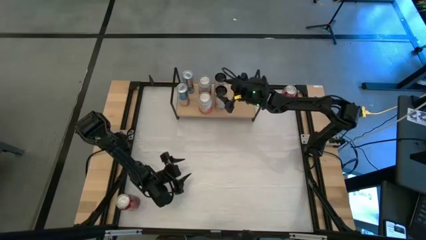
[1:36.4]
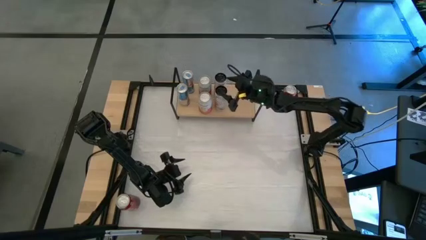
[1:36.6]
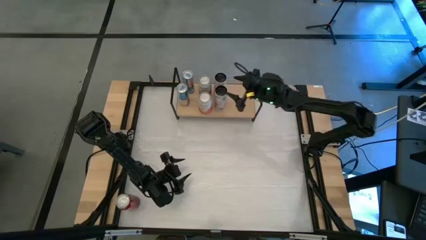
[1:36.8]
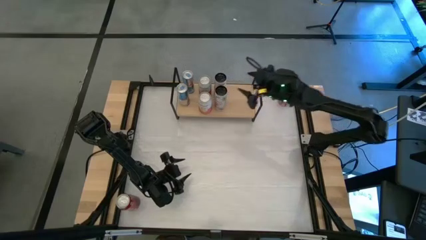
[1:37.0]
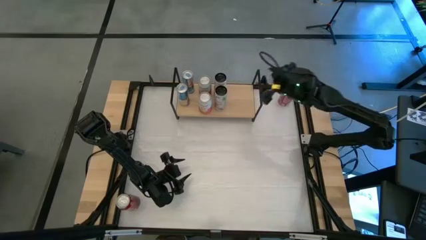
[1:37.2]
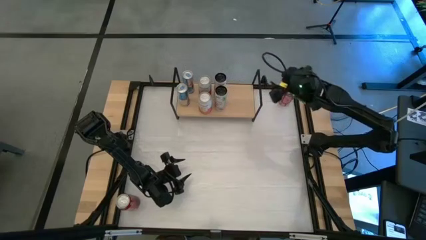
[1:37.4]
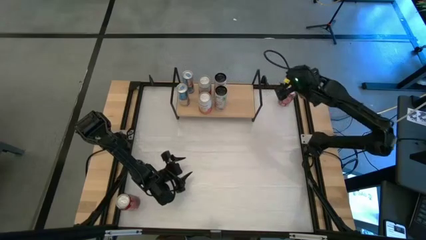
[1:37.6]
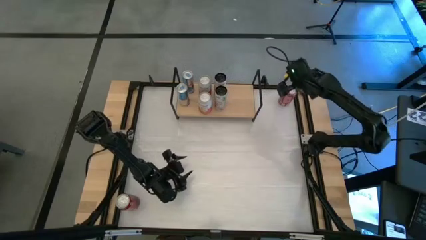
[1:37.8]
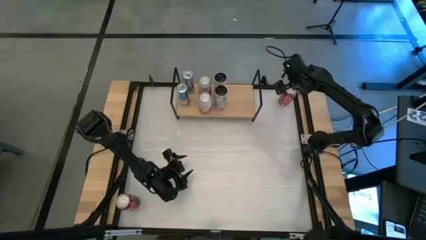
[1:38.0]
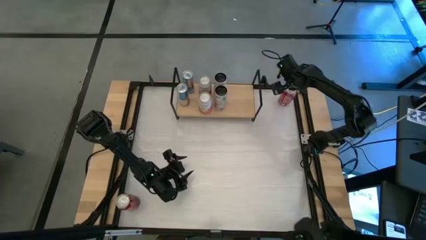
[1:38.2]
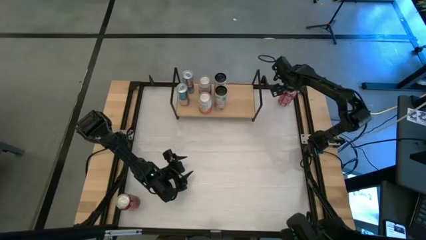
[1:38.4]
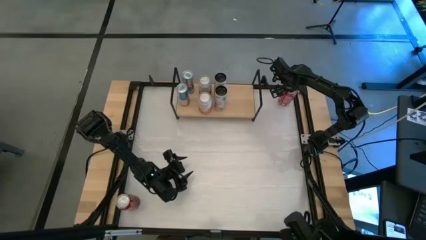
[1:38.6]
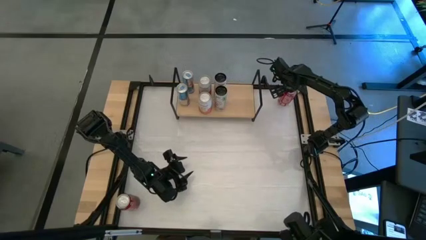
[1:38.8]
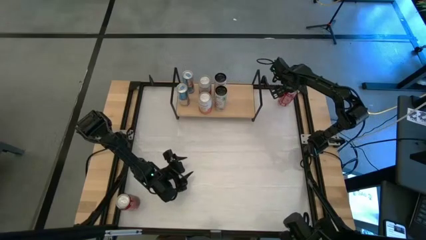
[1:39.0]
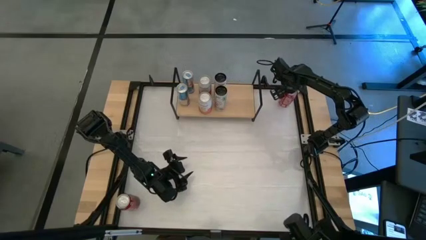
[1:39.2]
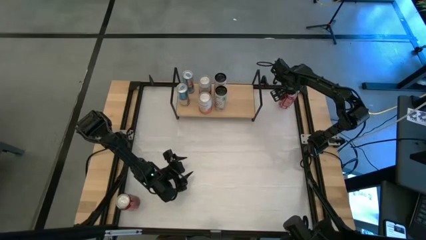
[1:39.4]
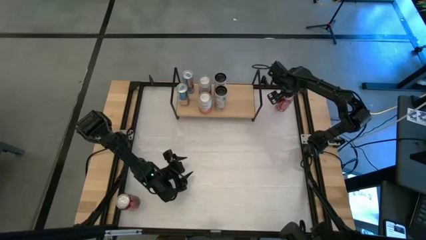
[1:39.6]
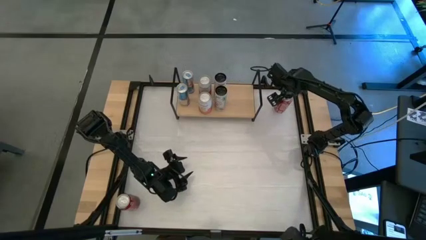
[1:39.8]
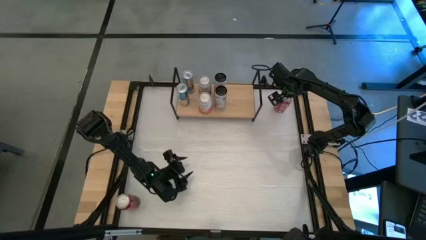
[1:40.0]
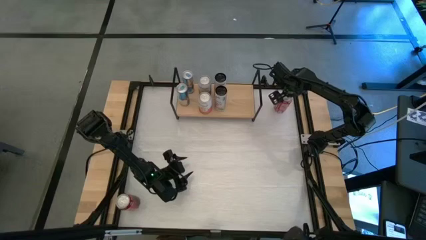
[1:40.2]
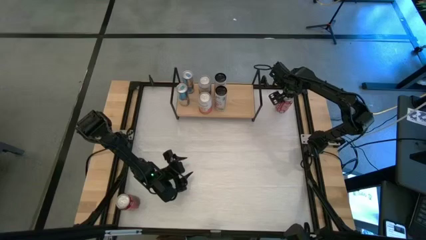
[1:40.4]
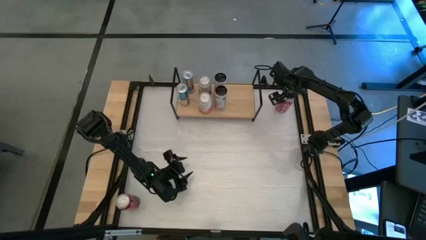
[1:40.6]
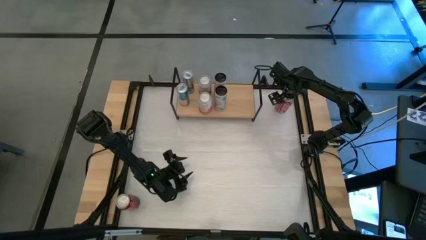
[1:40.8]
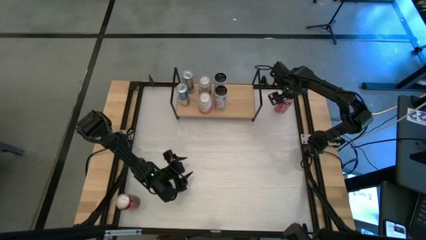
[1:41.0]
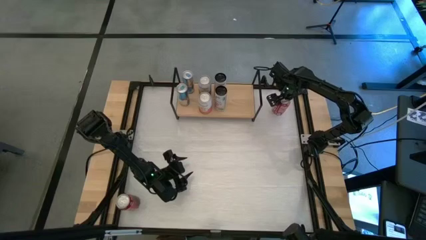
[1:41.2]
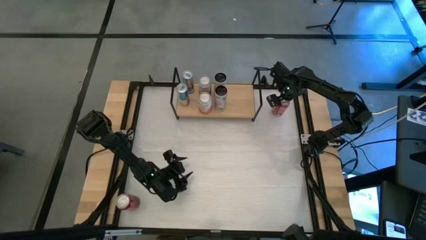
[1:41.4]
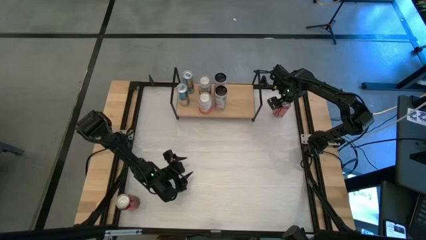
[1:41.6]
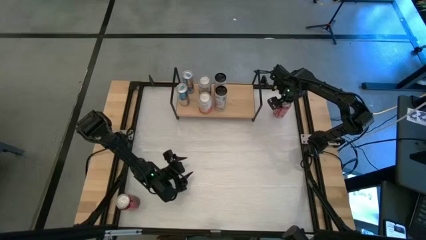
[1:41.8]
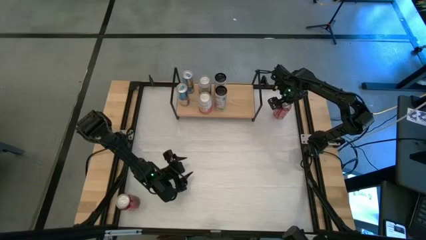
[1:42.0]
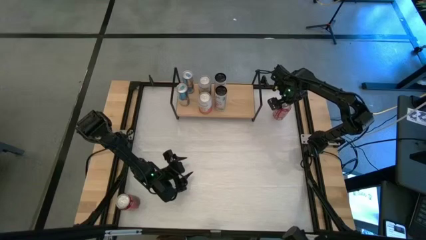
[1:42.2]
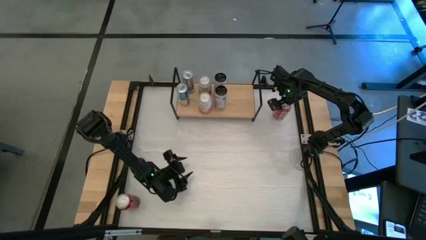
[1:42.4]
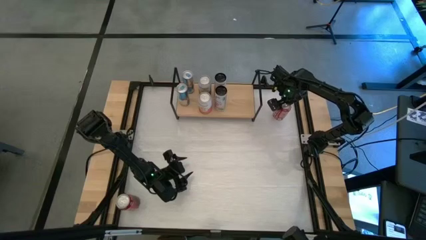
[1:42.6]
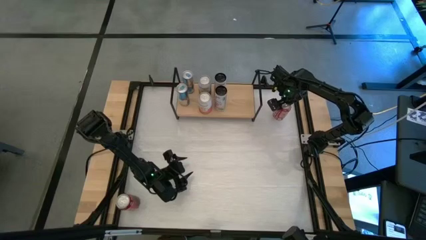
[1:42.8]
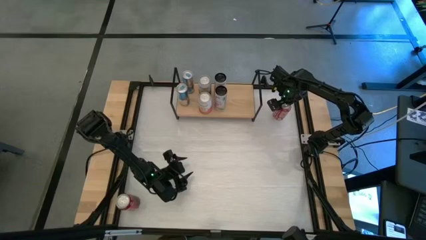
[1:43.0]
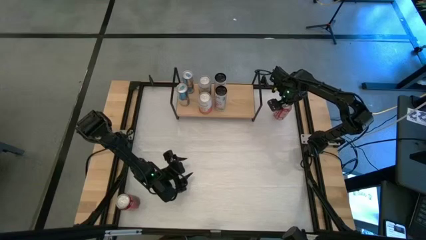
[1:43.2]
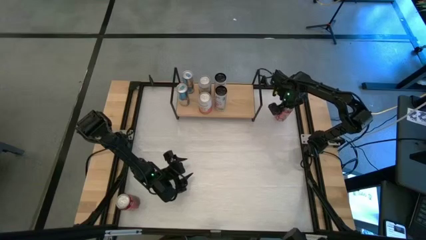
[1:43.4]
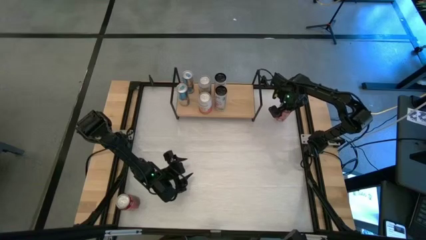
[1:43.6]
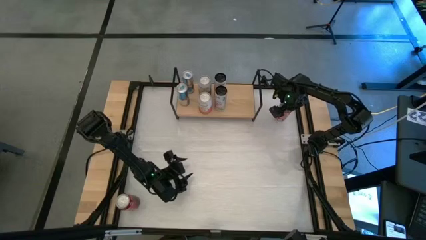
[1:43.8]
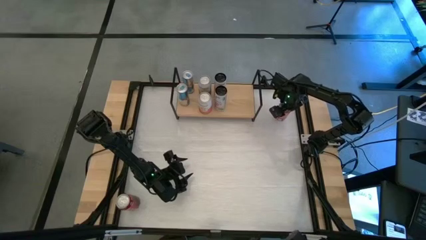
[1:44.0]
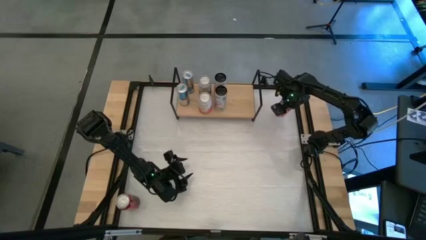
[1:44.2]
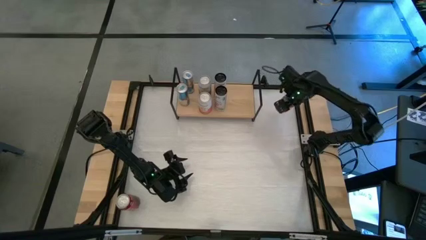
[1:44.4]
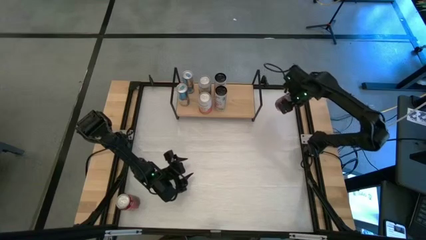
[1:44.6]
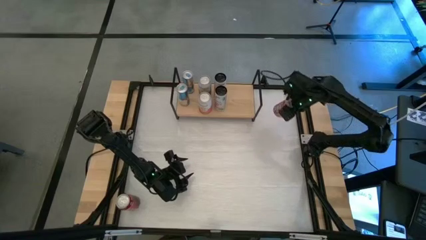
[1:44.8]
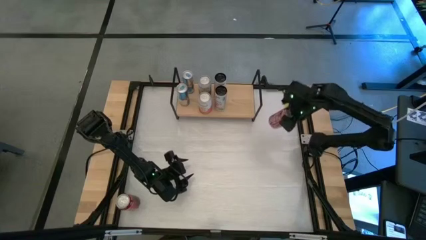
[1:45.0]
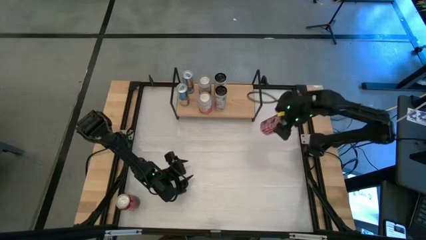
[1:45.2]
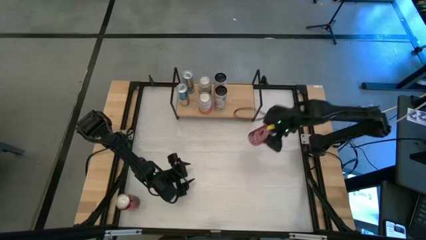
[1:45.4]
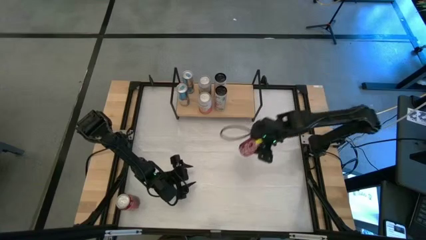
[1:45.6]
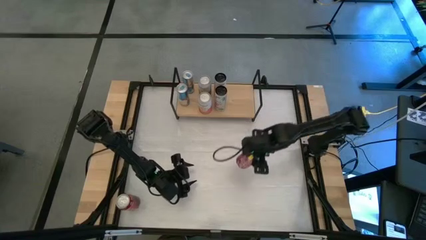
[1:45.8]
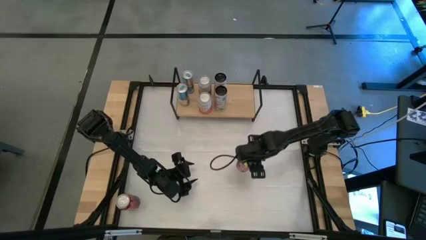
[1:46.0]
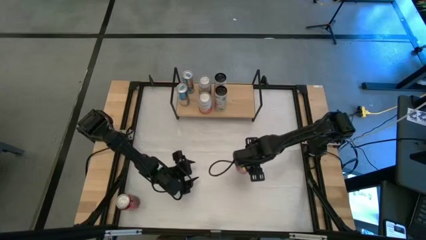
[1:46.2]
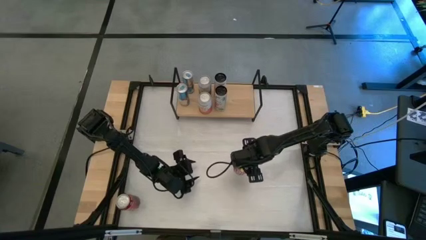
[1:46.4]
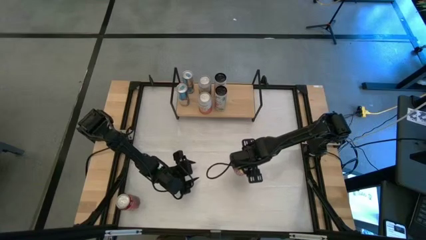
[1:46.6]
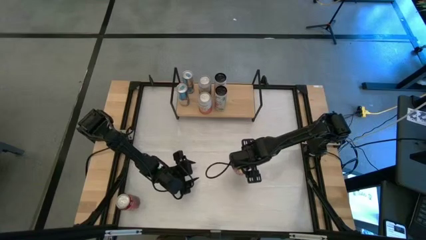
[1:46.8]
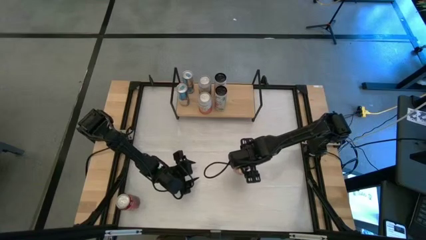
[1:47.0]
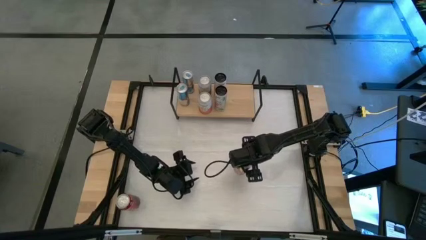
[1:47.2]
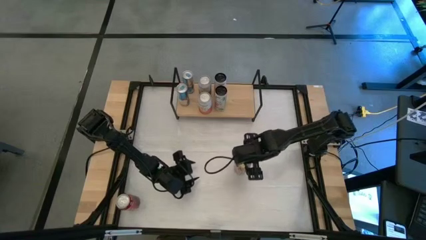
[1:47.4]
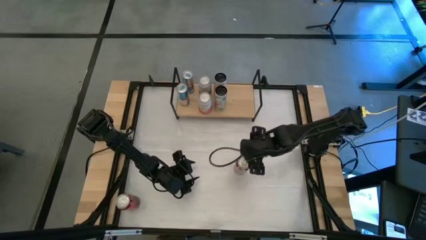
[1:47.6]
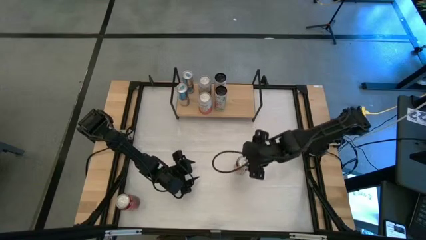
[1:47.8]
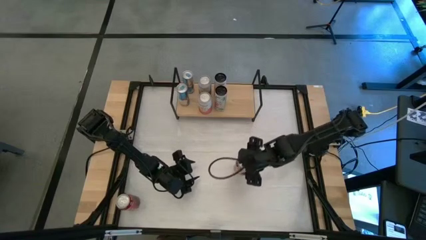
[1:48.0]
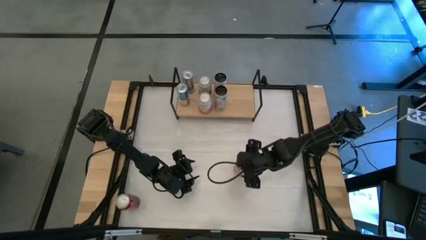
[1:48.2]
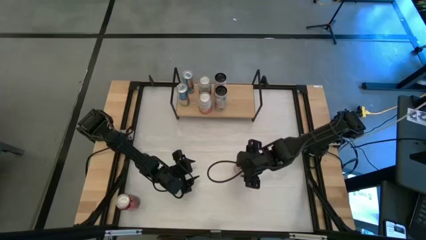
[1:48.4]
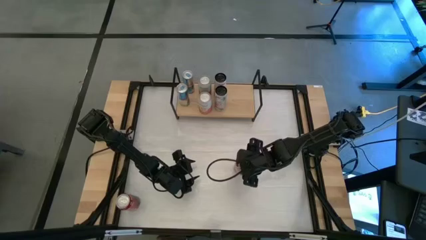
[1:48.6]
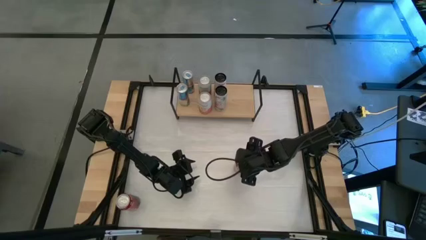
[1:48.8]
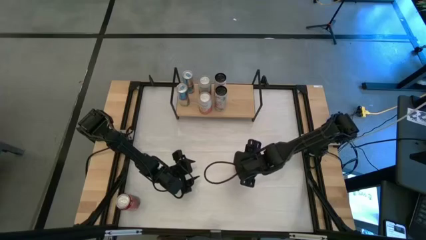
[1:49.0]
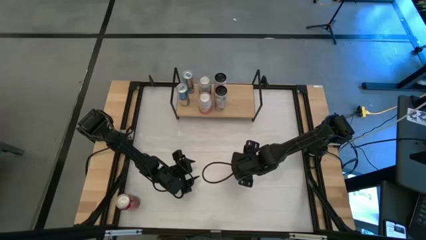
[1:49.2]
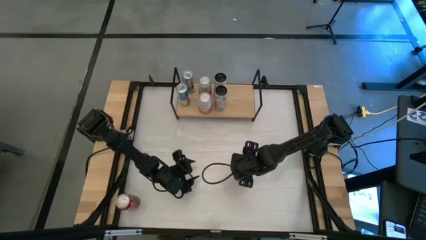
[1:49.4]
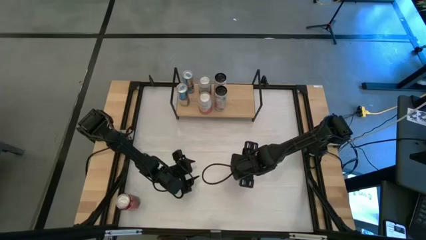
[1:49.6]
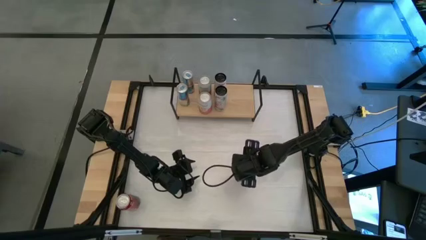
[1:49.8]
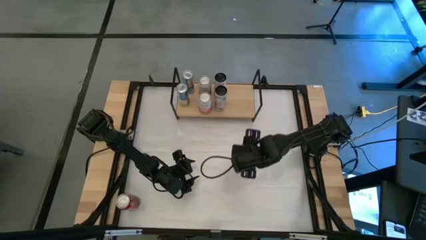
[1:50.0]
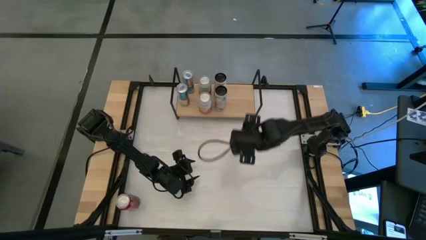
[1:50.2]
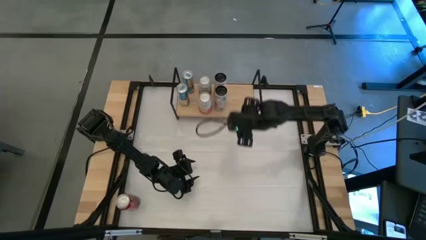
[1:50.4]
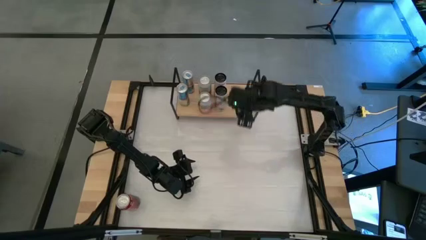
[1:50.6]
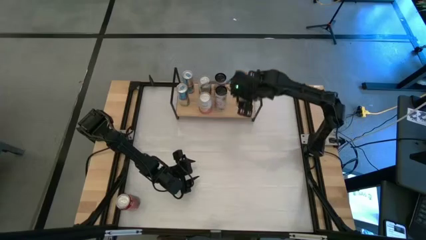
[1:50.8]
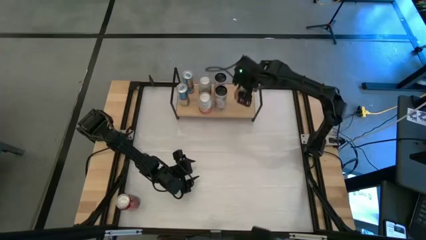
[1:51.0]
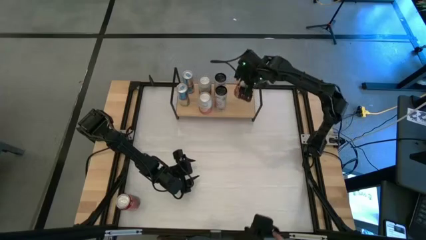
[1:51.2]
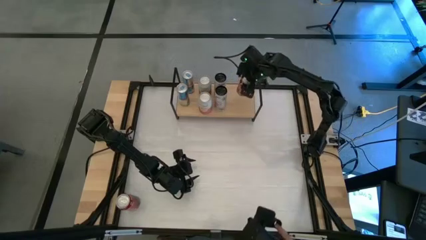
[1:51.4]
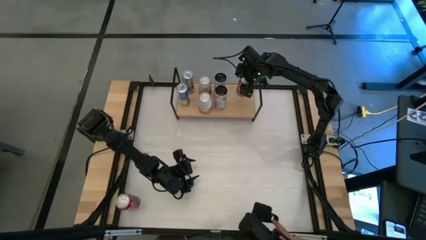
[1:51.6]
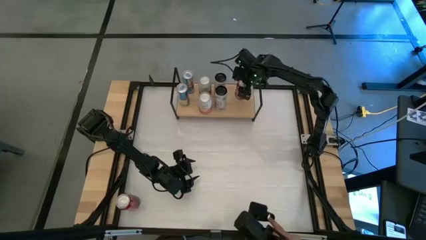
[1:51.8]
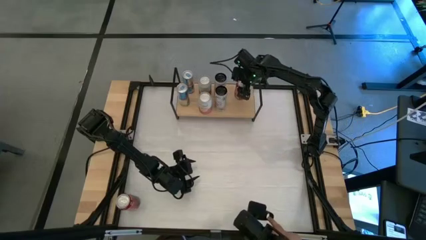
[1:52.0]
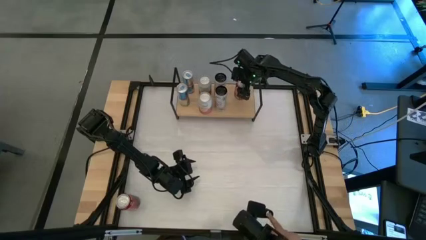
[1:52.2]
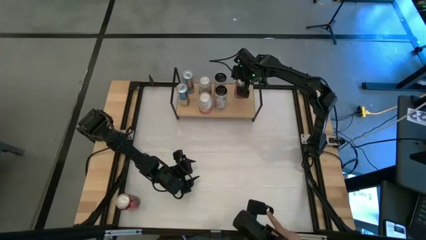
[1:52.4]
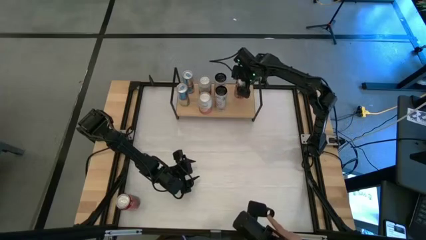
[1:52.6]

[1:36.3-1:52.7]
Task: Place canned beverage on shelf
Put the top red soda can on the shelf
